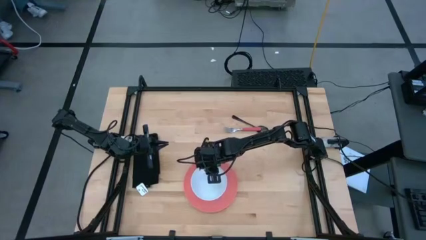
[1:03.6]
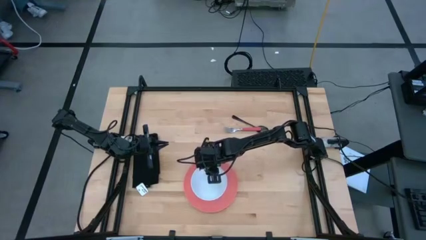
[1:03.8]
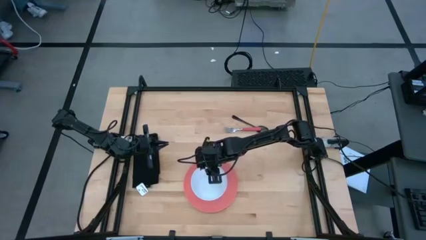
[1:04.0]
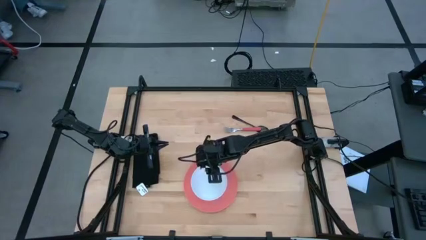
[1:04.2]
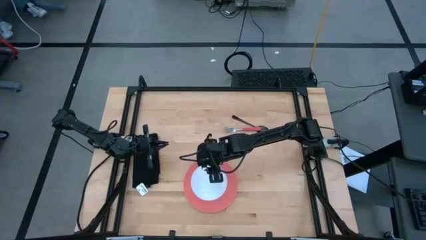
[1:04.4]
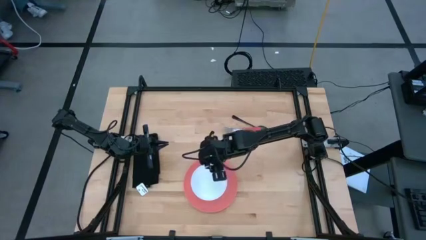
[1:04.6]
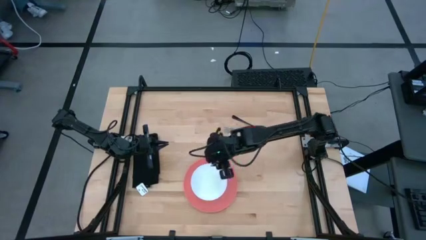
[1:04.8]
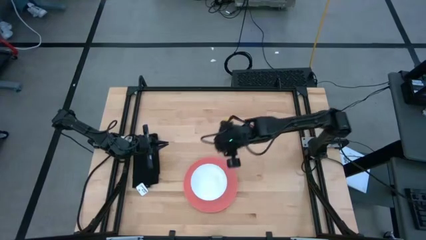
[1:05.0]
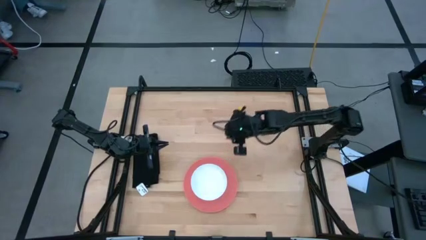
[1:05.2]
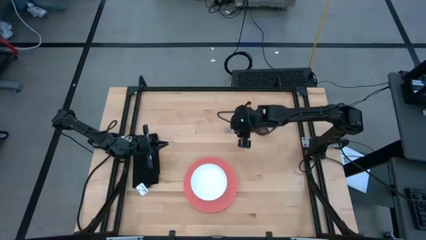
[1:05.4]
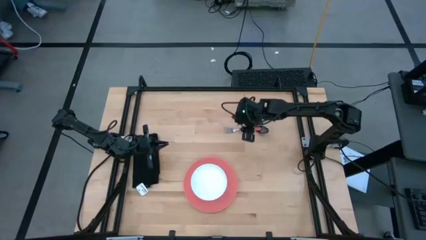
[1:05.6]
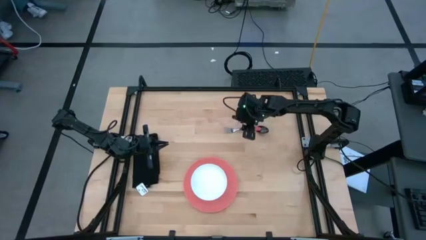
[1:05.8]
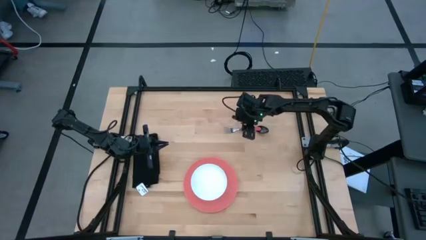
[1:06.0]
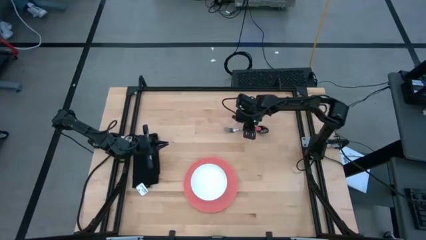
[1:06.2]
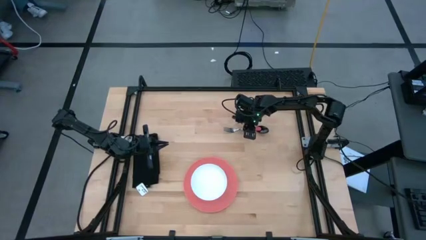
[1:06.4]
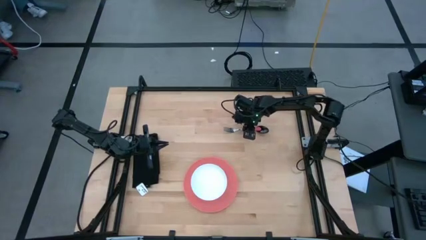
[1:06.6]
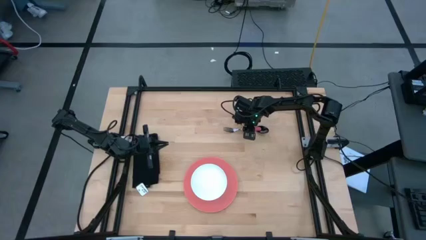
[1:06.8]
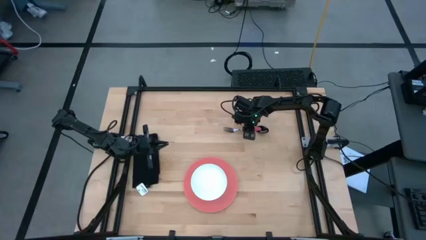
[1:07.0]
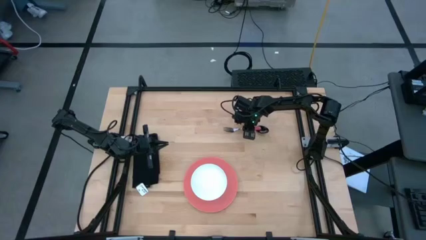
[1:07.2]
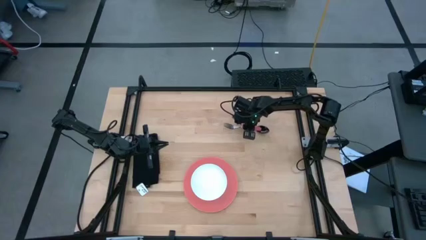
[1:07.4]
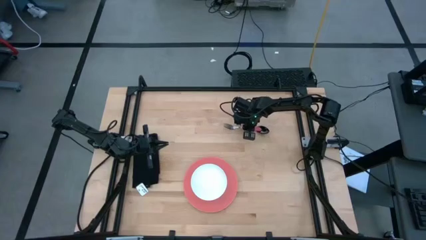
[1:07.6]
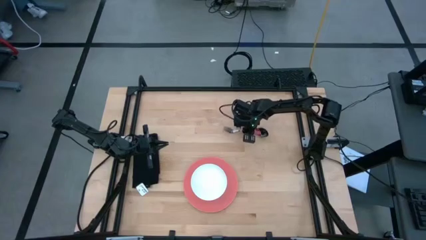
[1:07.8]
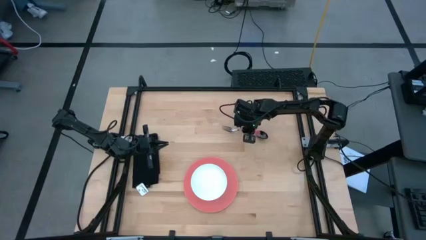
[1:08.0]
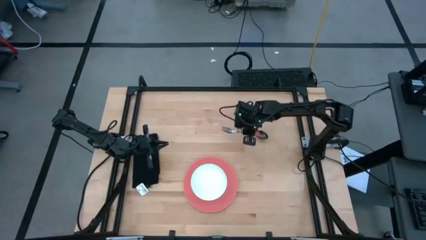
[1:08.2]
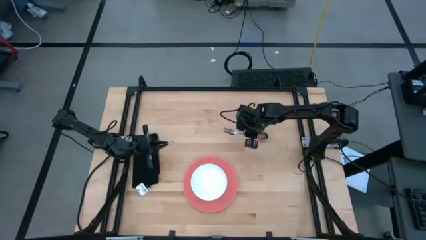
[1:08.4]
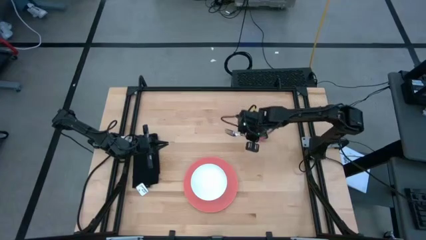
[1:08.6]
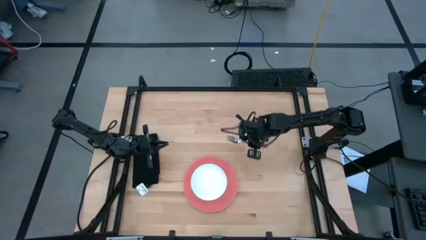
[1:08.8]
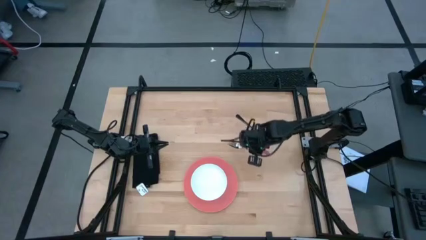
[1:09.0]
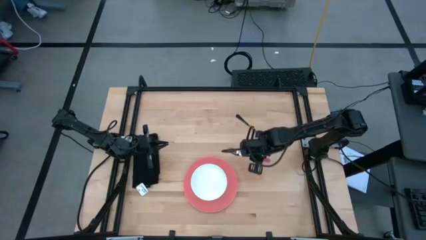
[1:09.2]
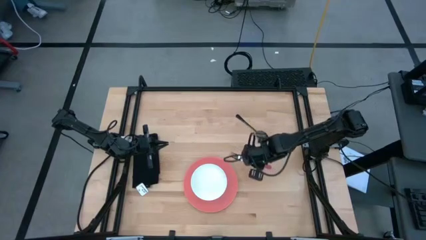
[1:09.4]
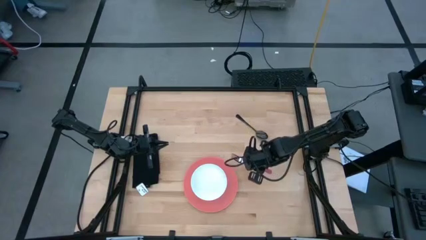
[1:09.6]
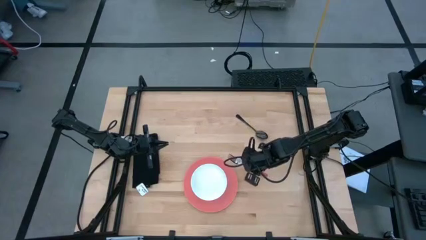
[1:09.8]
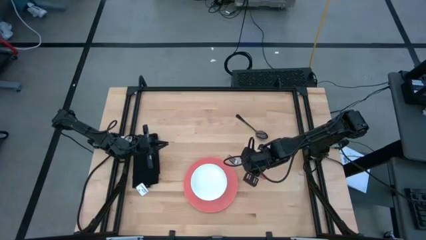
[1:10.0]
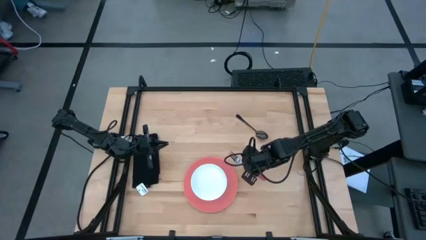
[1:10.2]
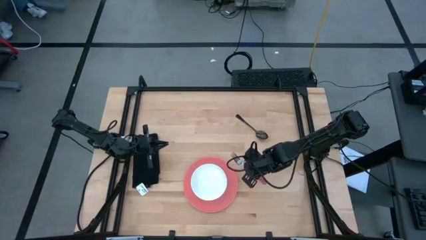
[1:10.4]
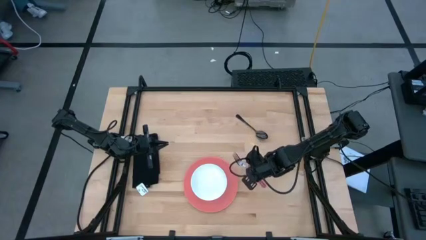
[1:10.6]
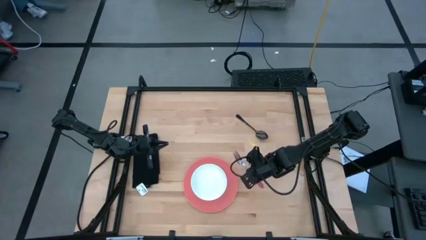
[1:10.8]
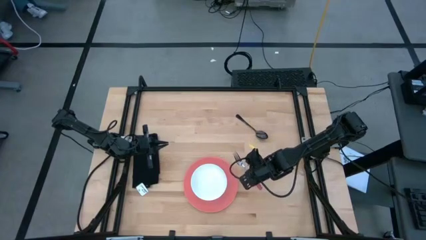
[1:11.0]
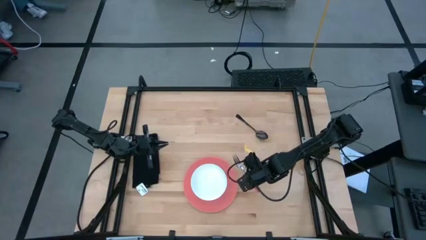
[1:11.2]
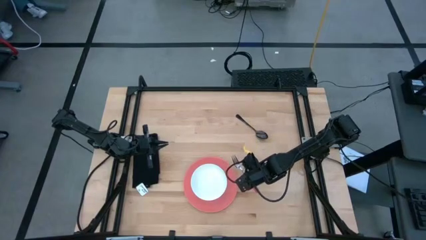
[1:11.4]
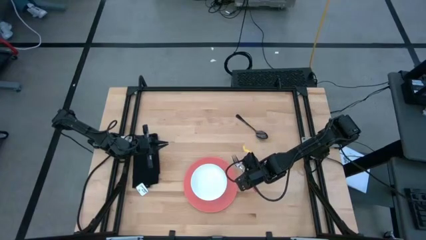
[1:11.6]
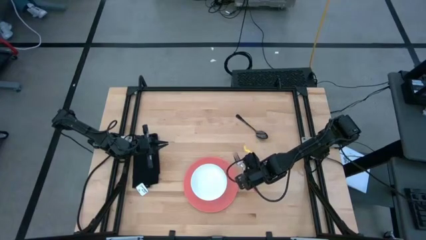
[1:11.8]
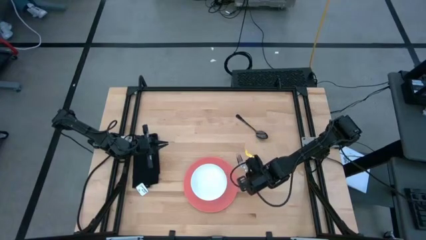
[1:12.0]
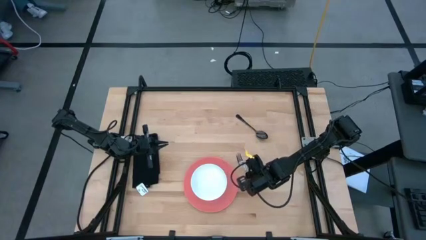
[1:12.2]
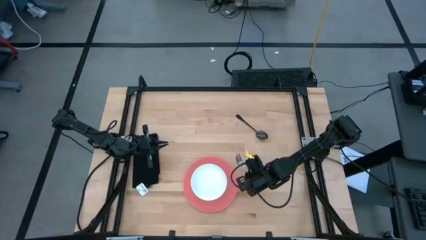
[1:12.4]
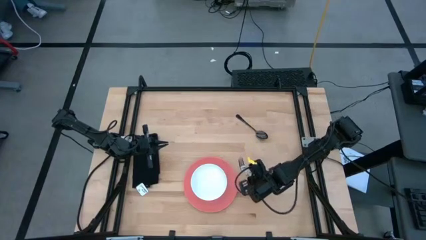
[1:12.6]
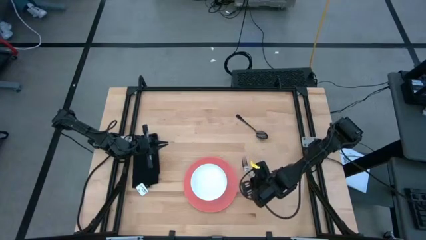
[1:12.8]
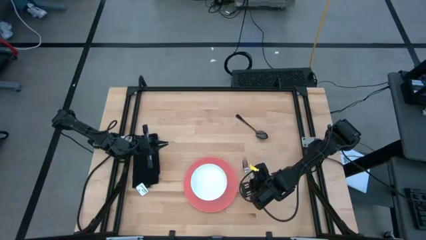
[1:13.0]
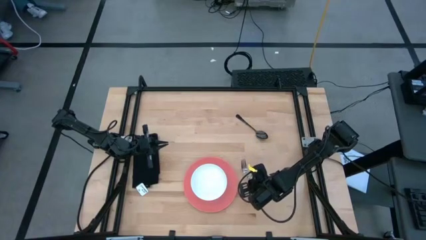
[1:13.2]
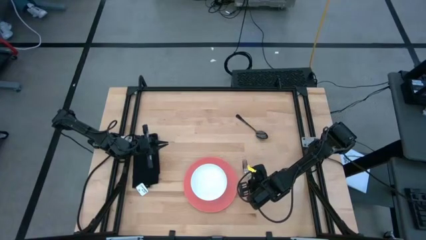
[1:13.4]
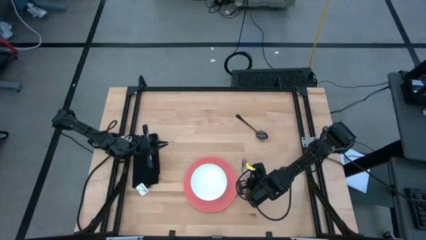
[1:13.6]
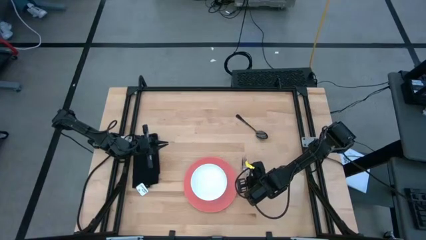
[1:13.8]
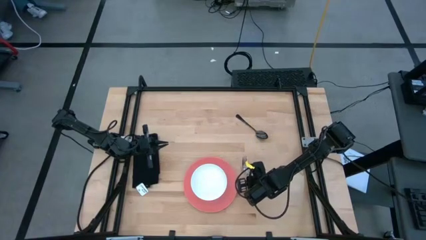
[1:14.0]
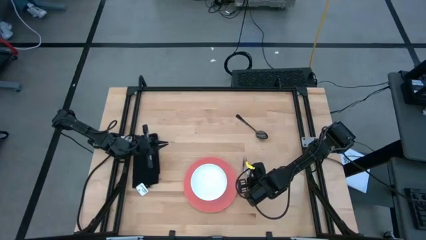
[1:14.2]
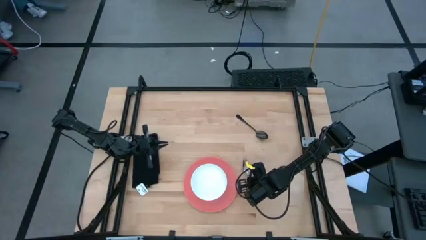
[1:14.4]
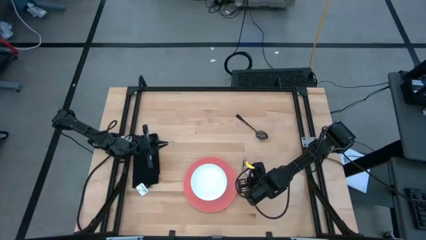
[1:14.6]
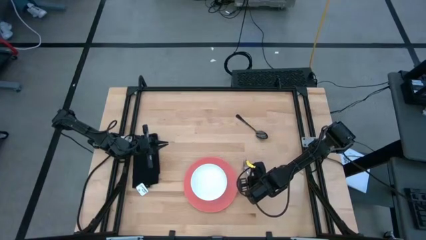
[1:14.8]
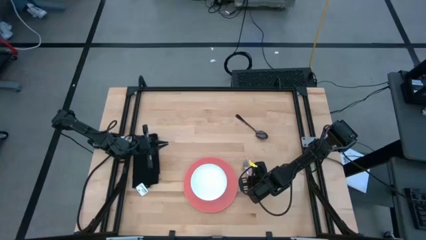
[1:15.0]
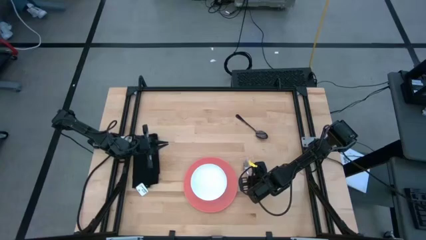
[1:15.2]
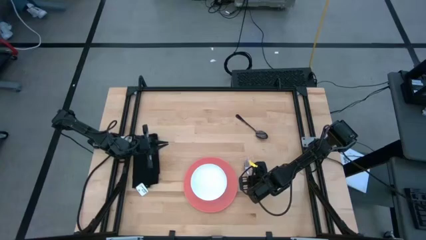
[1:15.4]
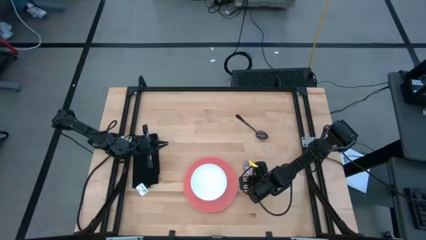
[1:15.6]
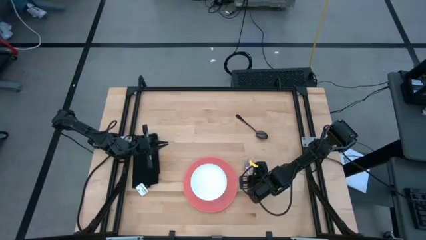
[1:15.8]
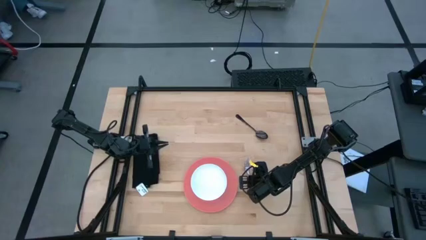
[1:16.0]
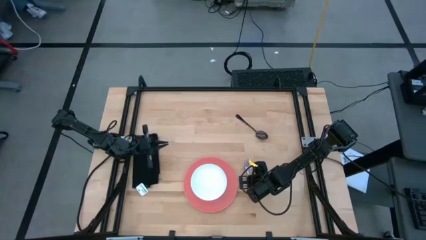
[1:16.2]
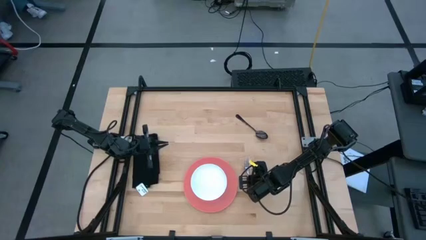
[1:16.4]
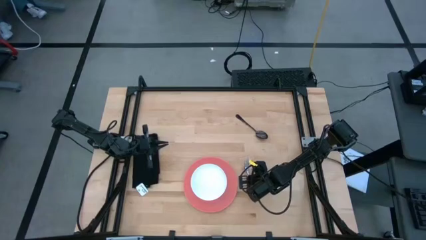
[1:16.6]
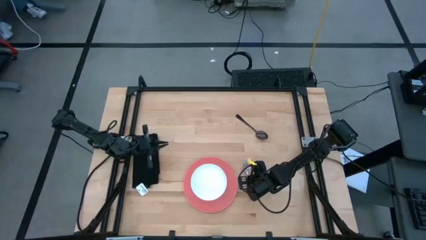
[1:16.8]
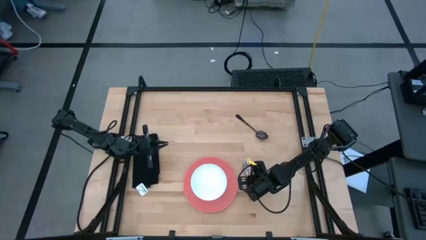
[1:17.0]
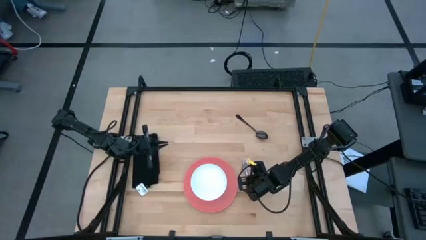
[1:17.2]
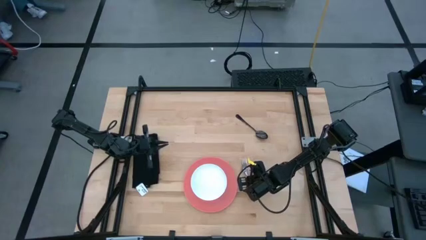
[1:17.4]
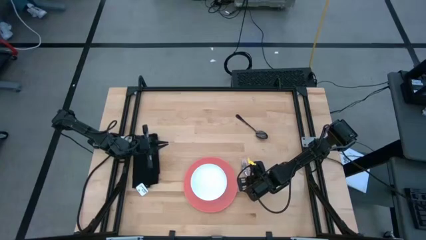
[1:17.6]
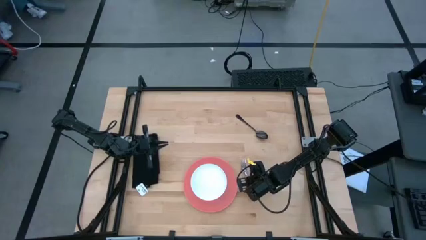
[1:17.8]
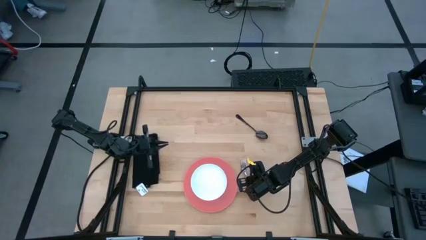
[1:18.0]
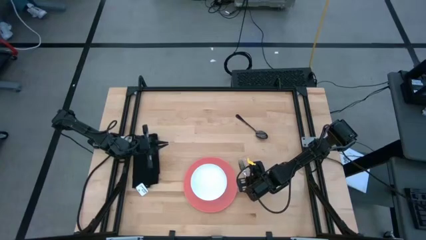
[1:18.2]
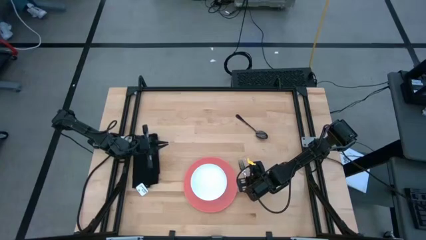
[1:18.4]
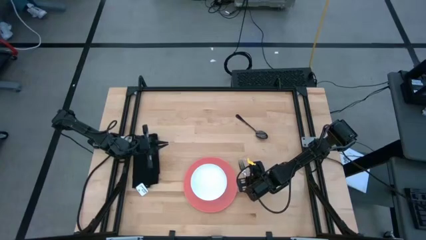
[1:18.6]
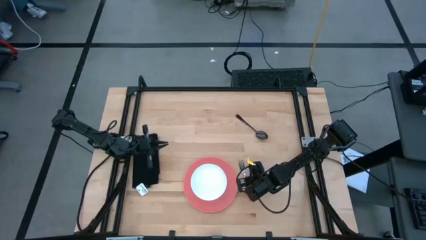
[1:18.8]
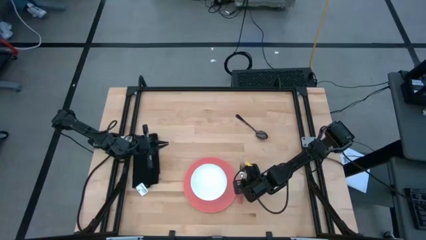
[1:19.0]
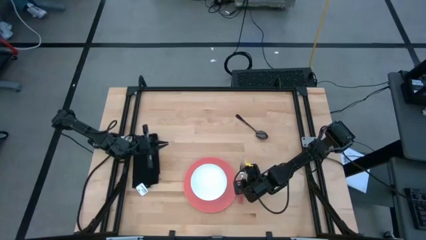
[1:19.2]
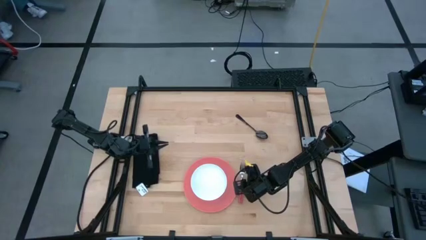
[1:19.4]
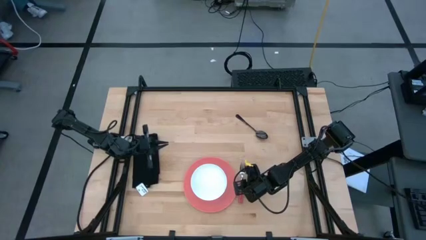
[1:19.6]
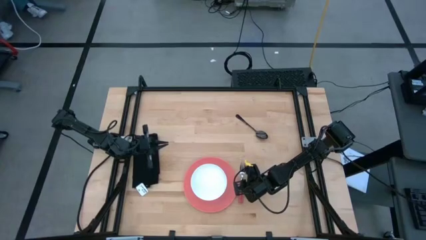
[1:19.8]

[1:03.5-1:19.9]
Task: Set table place
Put the pink fork to the right of the pink plate
